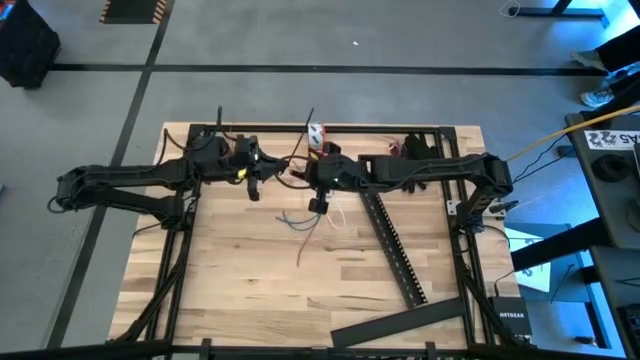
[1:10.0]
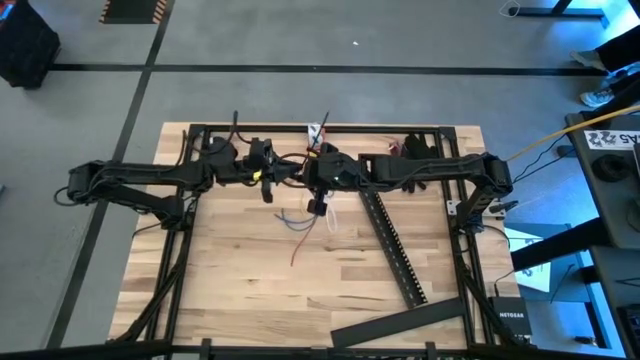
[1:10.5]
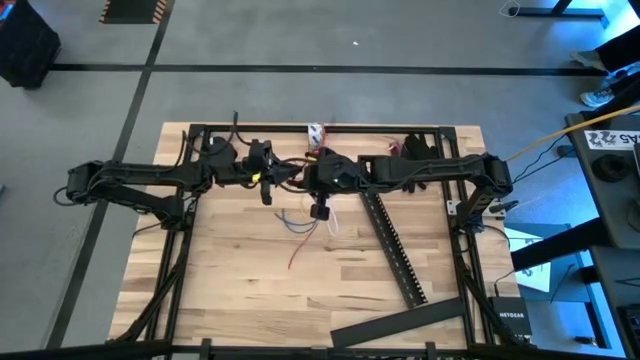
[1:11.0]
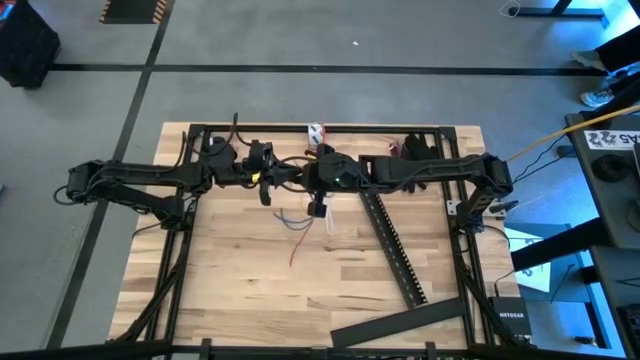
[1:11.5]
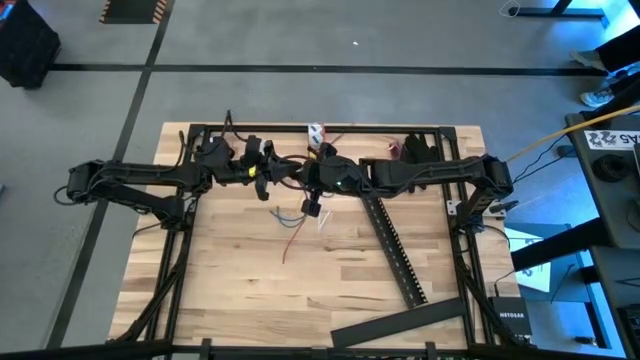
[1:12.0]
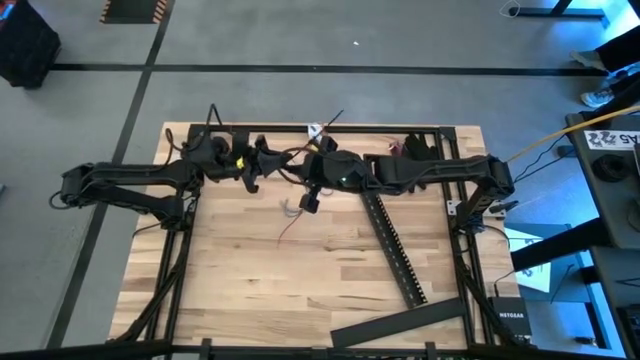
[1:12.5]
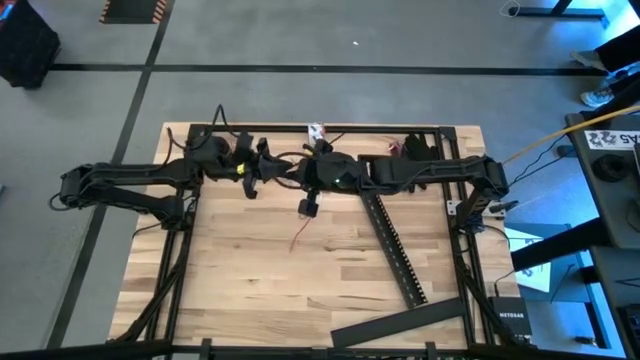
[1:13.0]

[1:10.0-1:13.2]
Task: Ziptie cables
Wrap the black zip tie on the cable

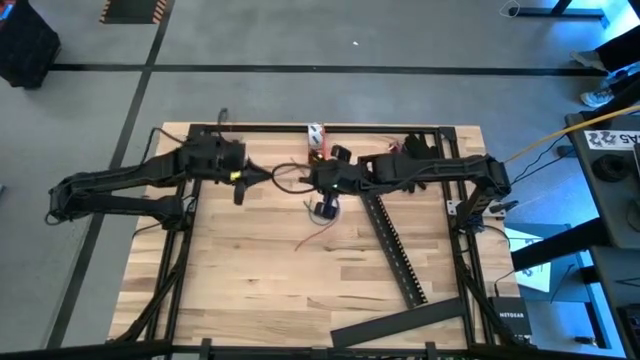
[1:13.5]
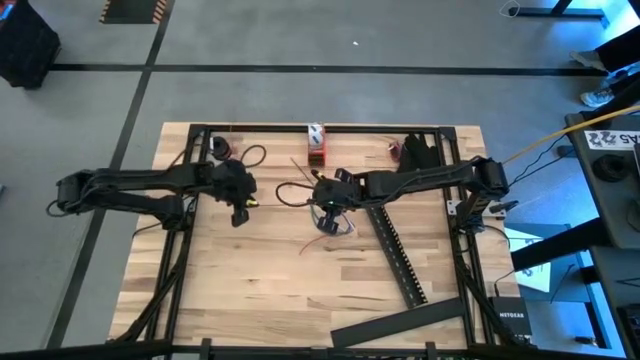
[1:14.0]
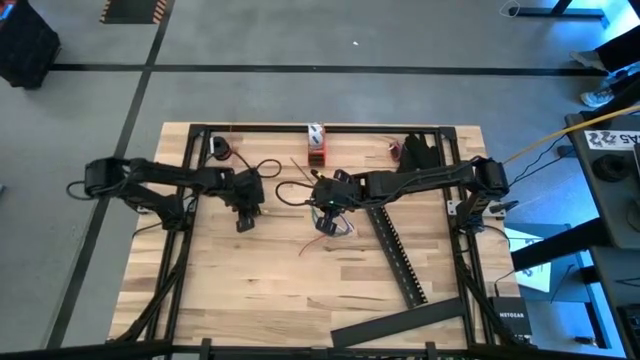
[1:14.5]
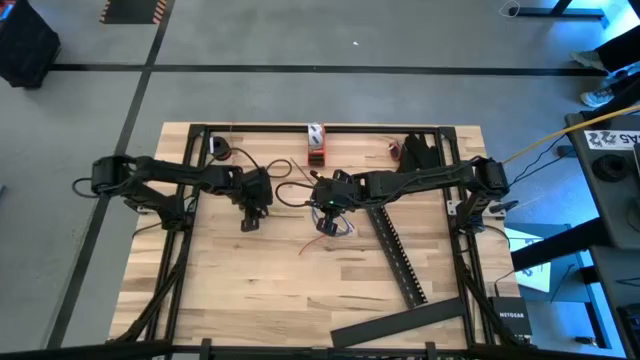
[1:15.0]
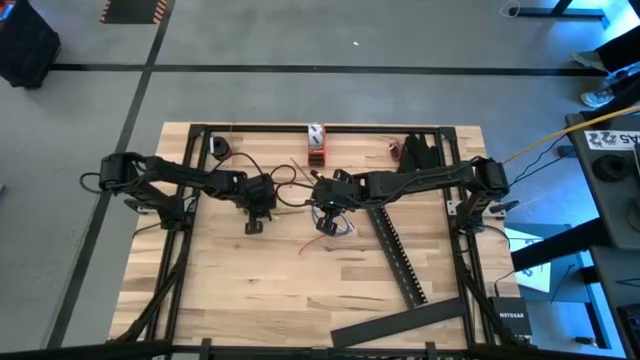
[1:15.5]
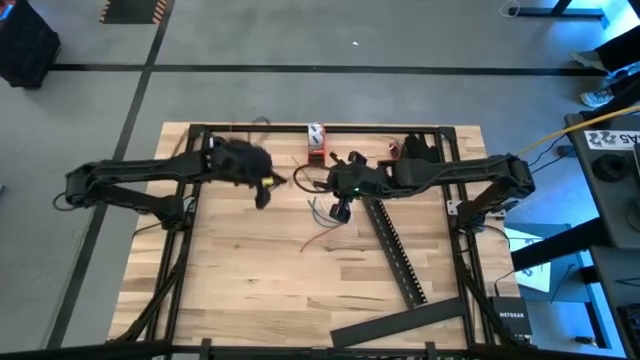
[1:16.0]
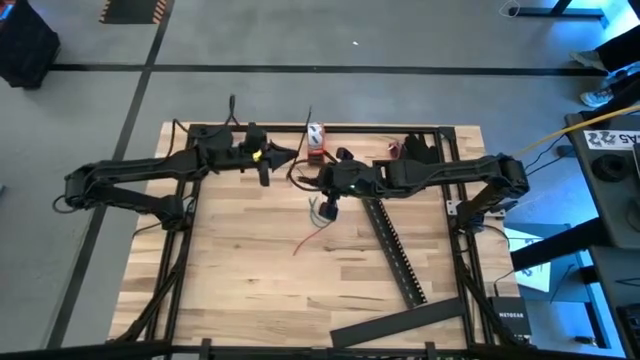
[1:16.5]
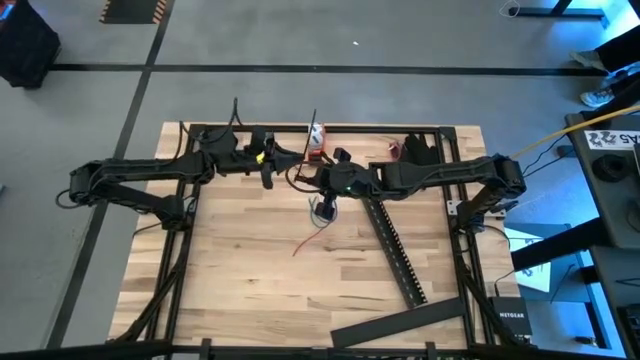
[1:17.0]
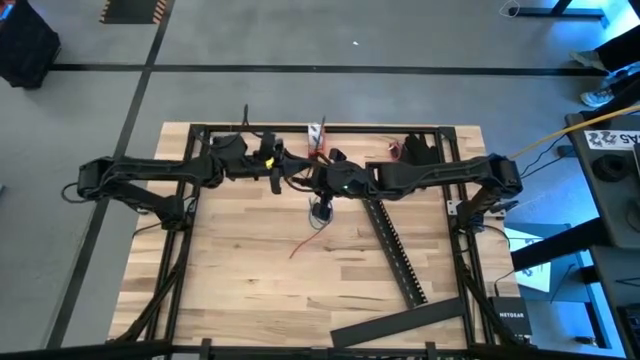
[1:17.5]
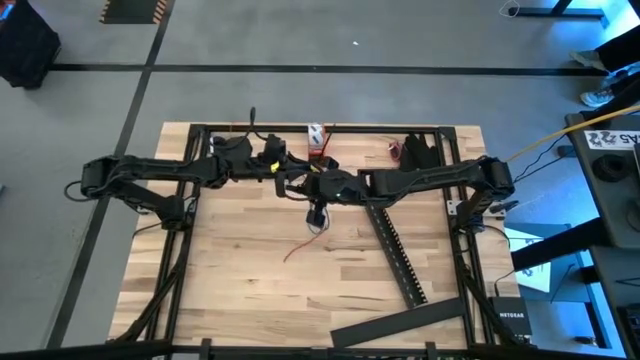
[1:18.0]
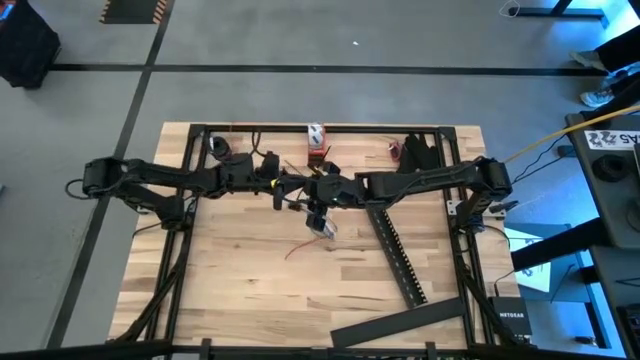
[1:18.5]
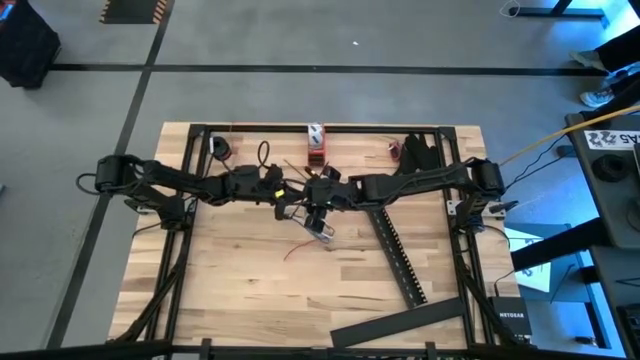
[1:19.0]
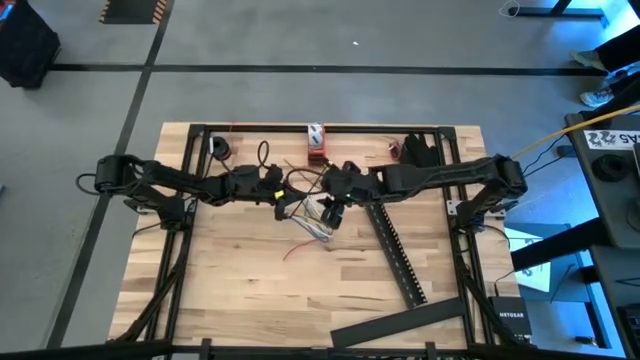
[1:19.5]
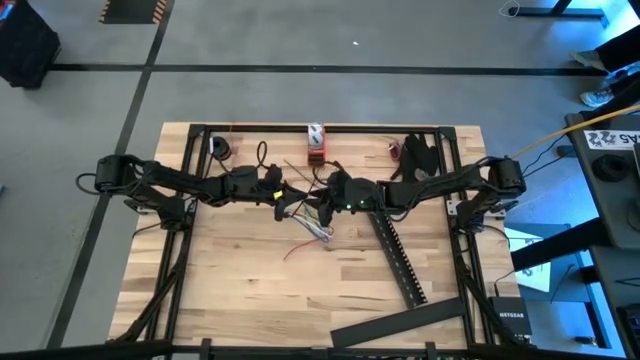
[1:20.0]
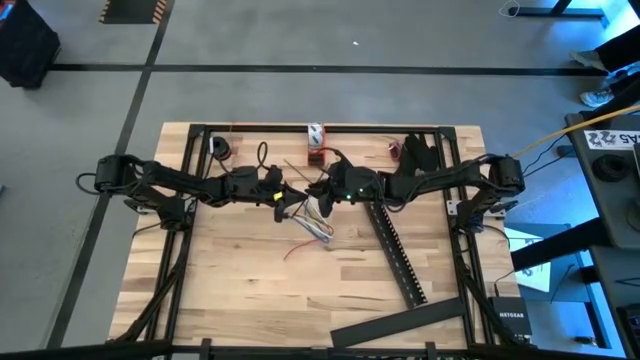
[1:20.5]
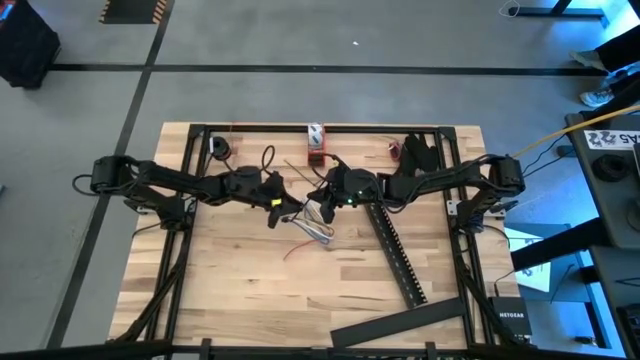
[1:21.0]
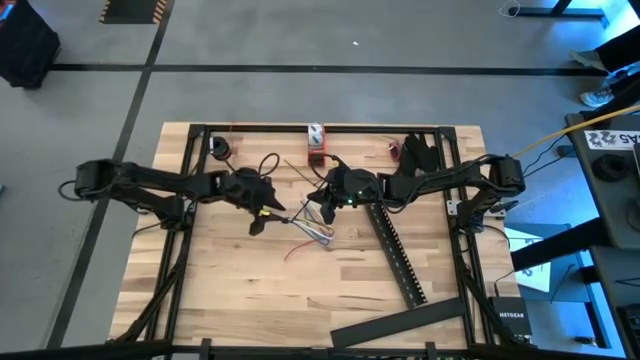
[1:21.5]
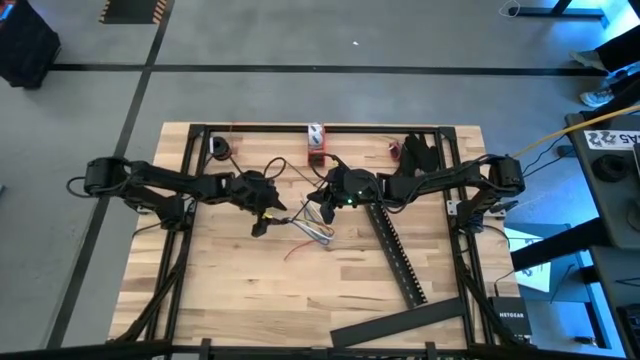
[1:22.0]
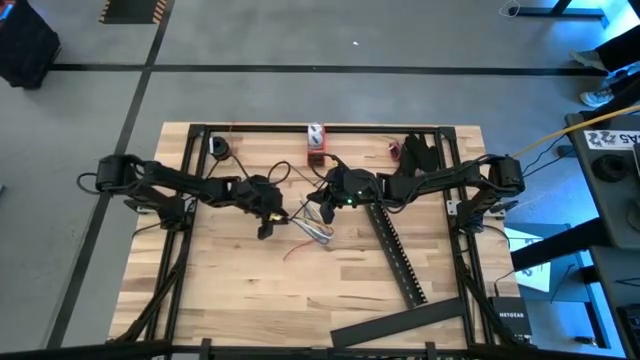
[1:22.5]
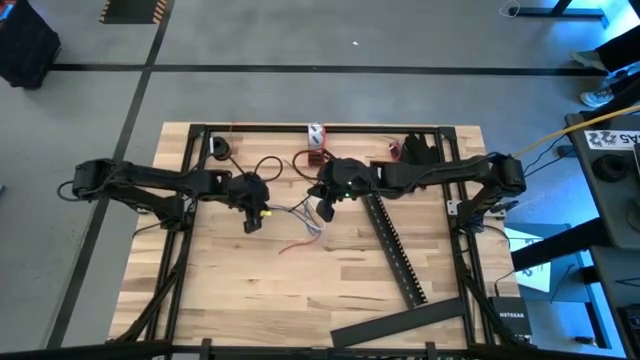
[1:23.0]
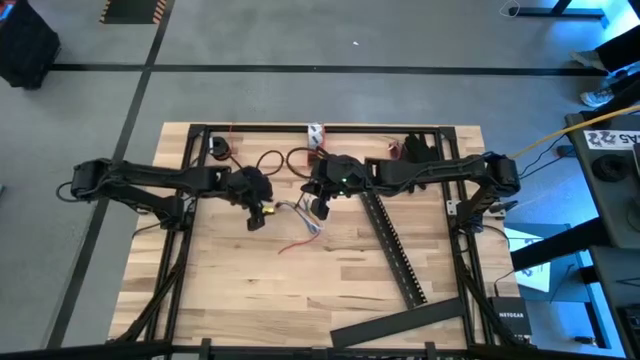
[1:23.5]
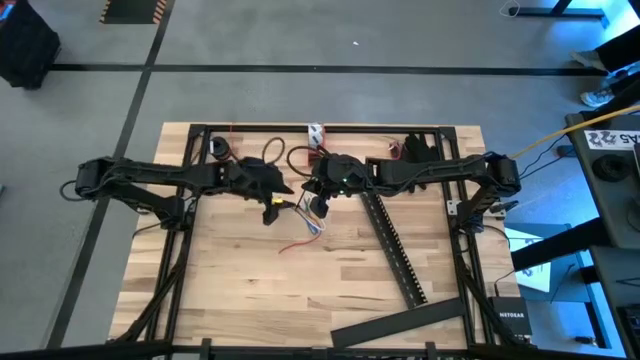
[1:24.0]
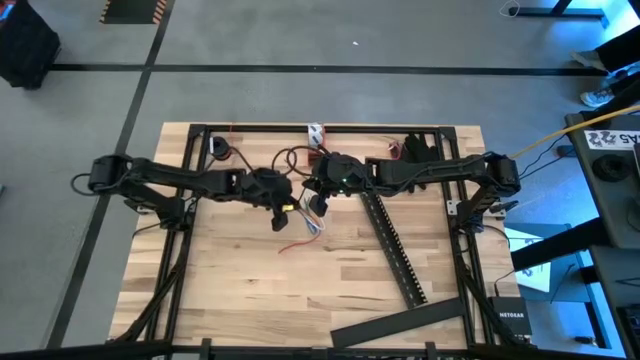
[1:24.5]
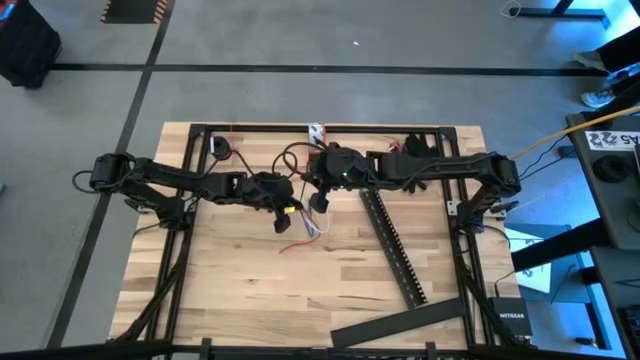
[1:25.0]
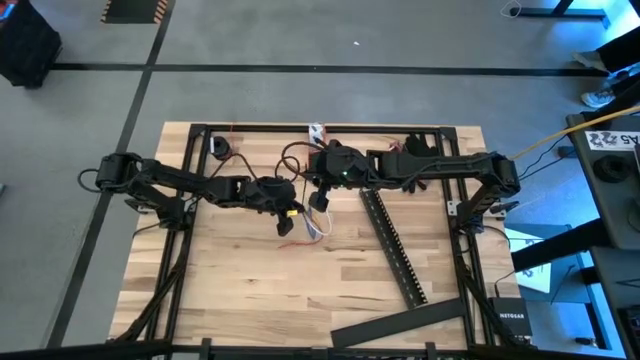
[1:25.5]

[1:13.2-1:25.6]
Wrap the black zip tie on the cable

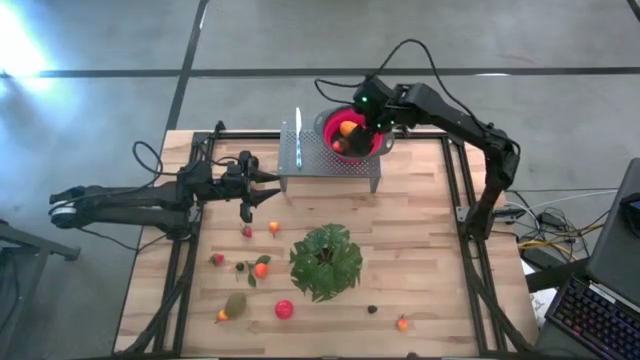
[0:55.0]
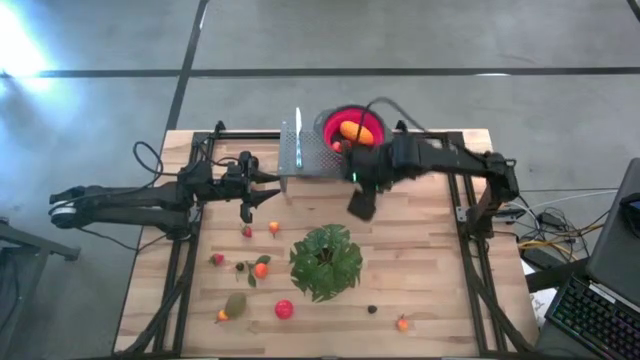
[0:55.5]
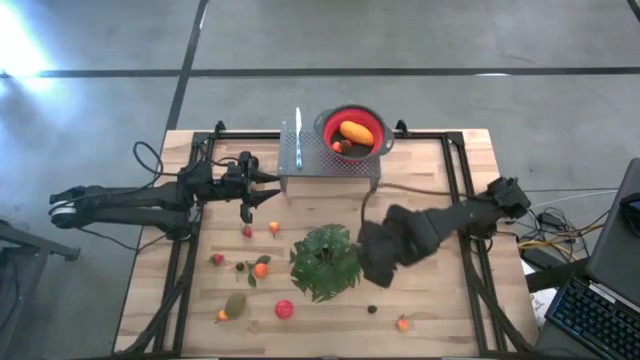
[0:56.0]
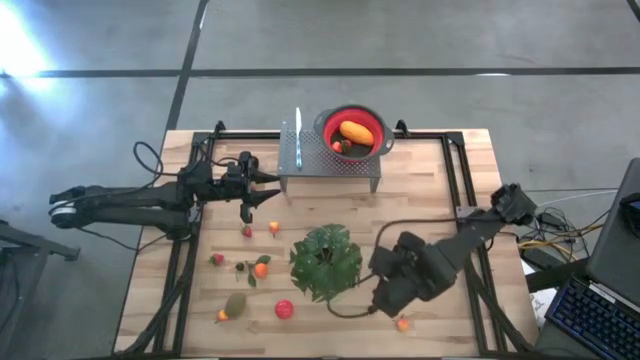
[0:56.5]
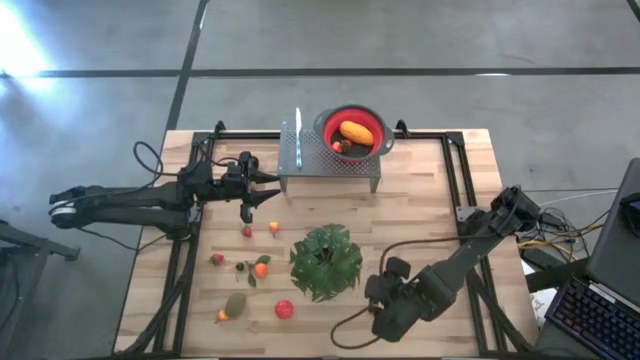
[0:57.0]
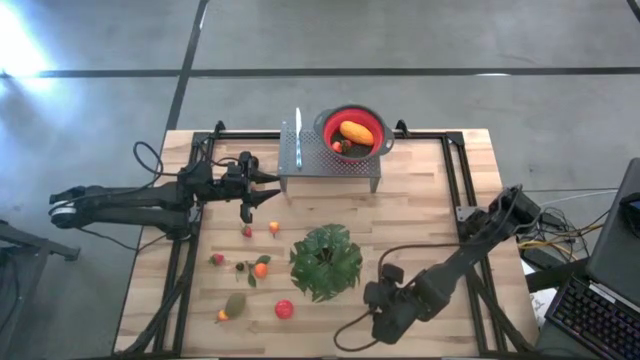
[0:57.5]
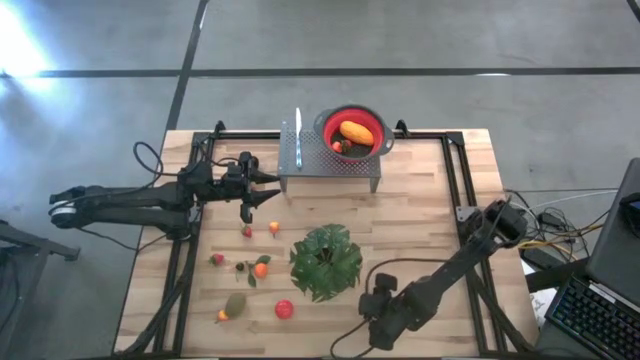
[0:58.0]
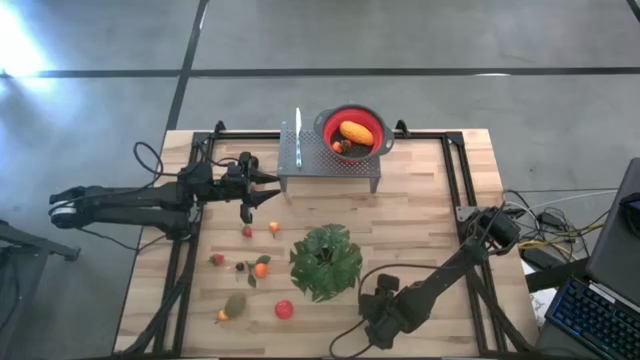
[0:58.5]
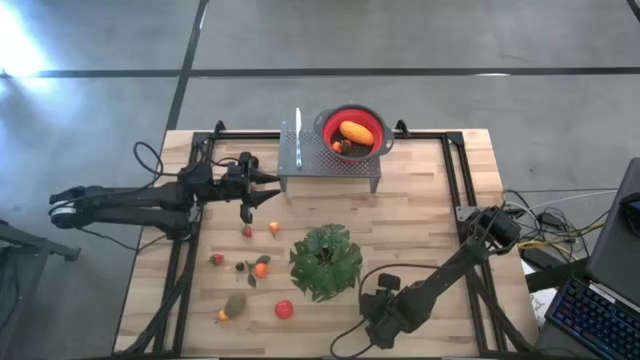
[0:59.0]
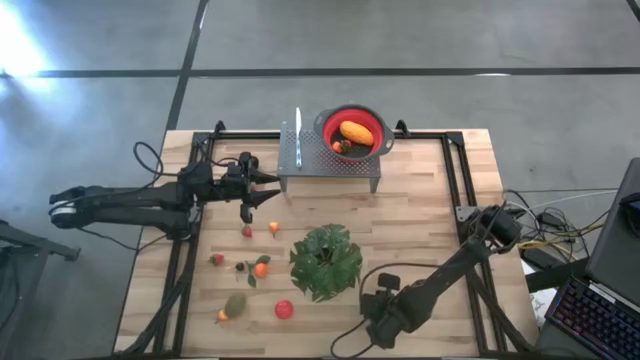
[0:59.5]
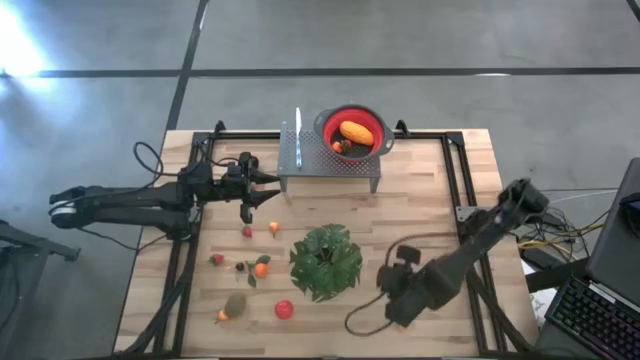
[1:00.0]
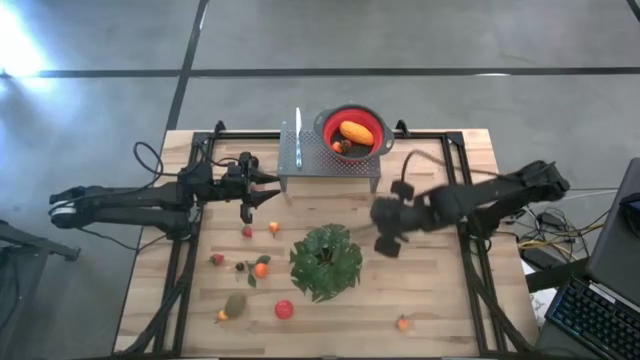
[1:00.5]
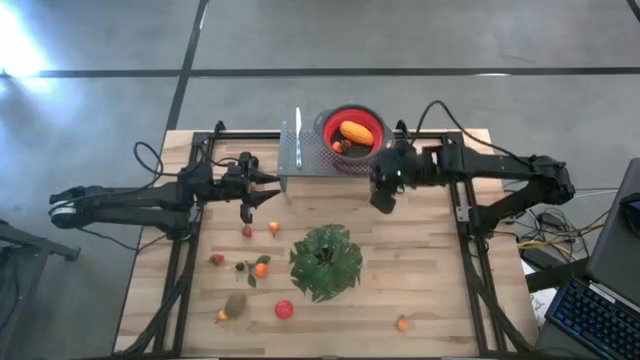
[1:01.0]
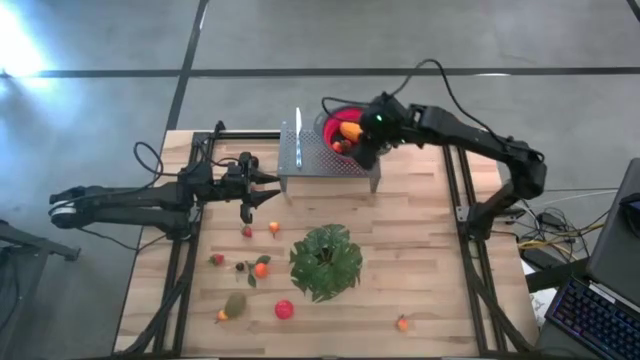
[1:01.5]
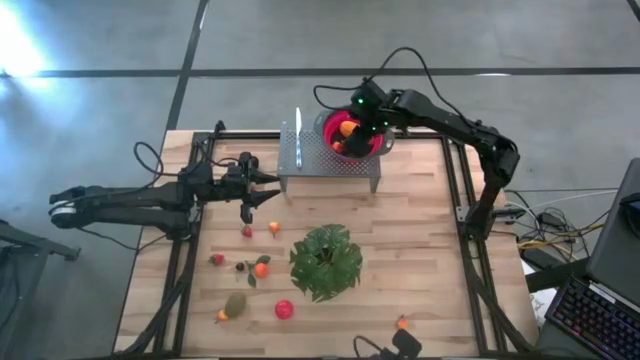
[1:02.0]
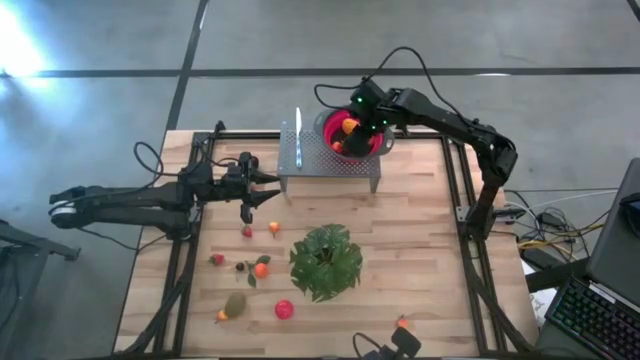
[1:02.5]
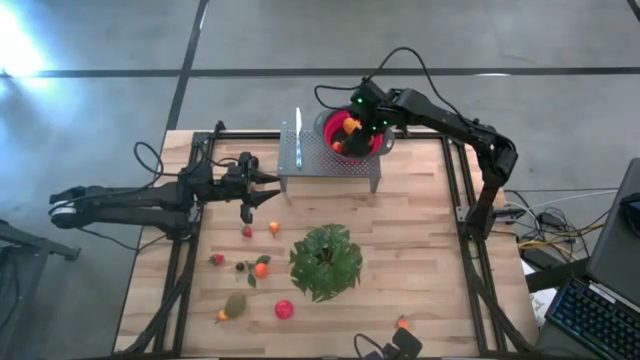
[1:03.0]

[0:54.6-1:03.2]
Task: Pick & Place Fruit
Put the blackberry into the red strainer bowl on the shelf
